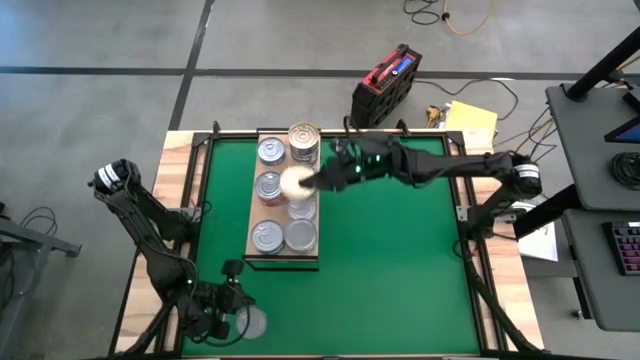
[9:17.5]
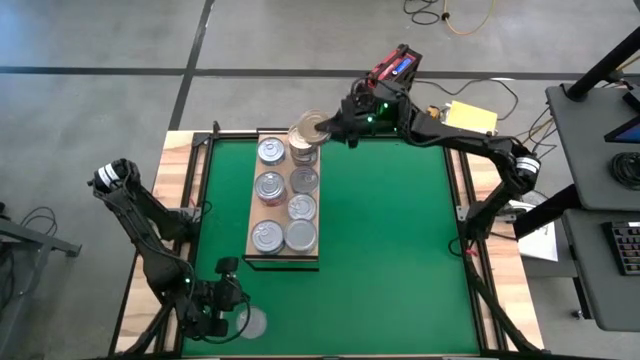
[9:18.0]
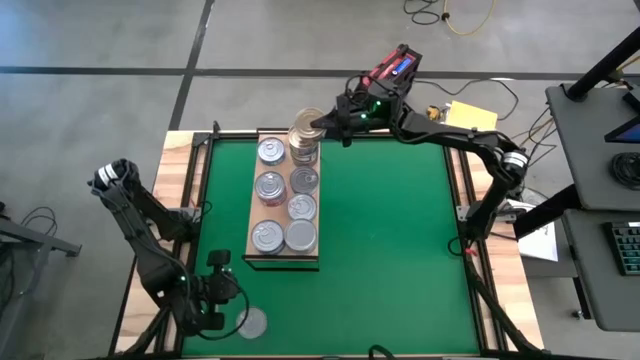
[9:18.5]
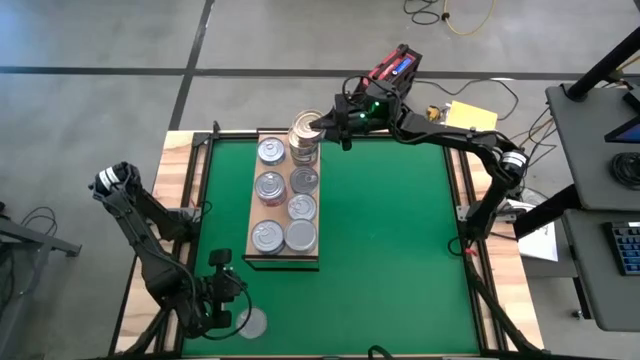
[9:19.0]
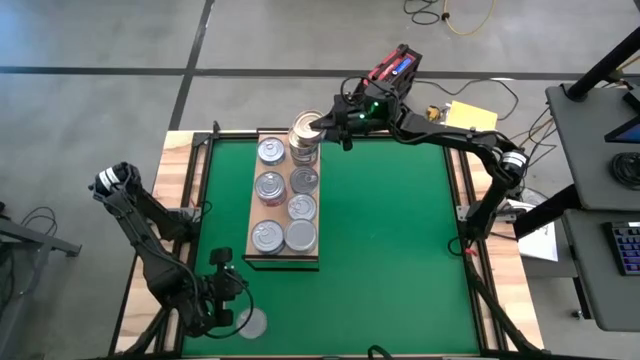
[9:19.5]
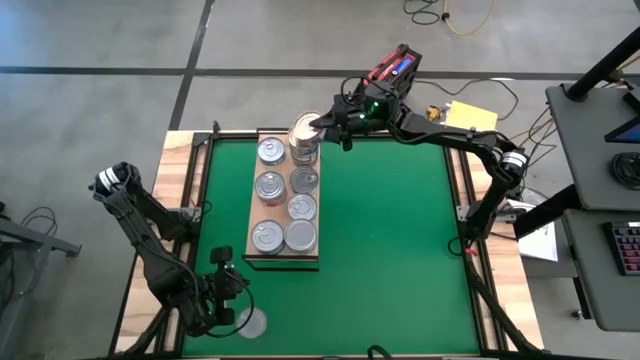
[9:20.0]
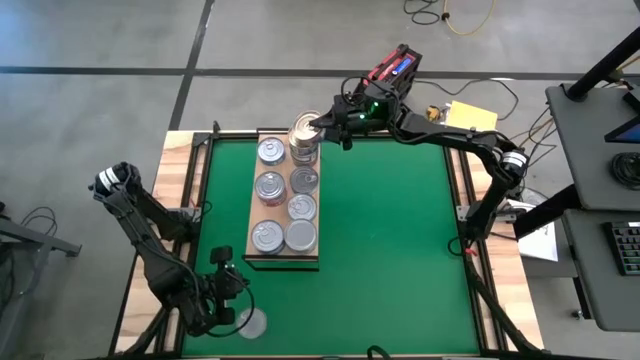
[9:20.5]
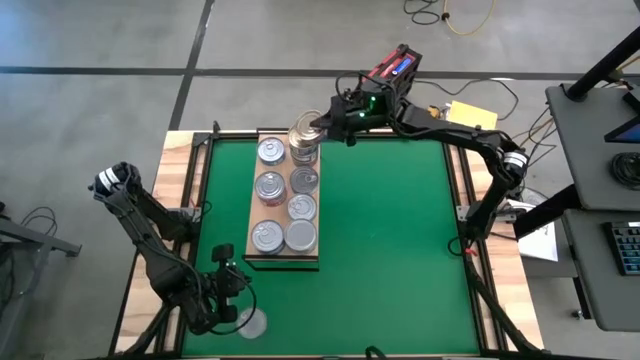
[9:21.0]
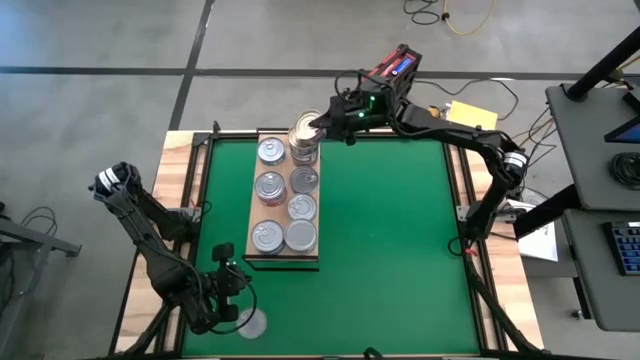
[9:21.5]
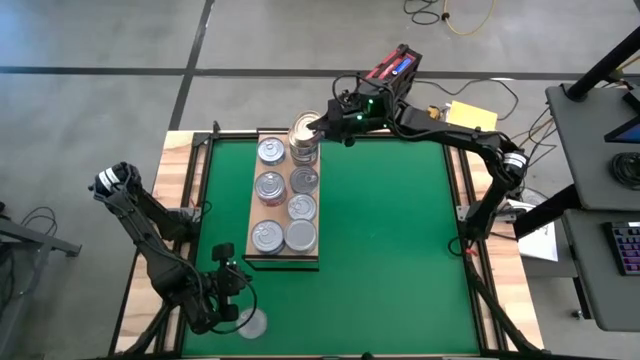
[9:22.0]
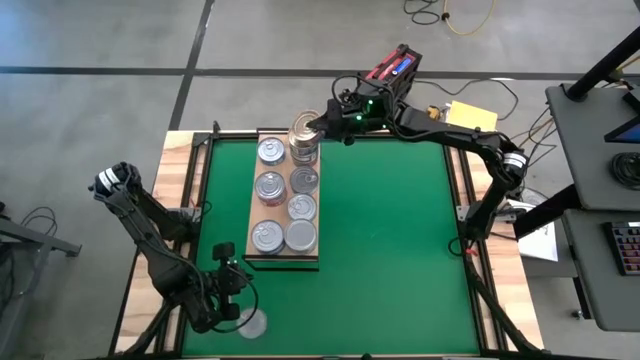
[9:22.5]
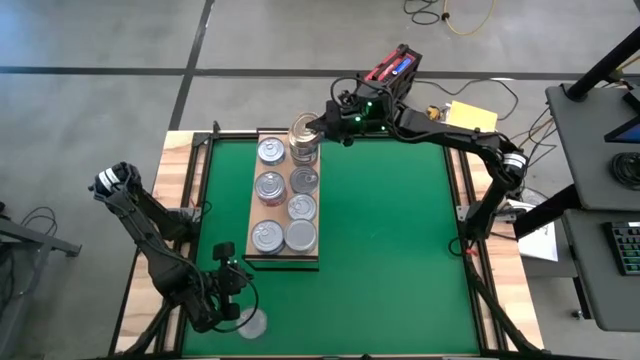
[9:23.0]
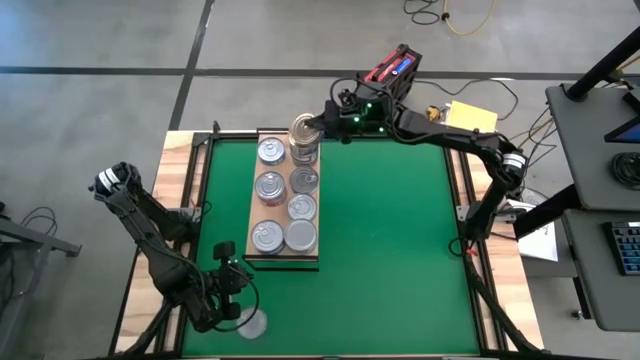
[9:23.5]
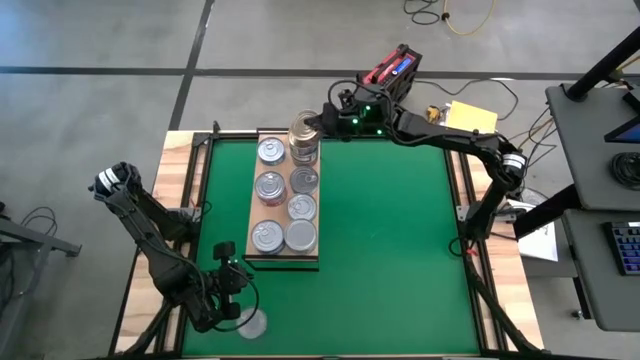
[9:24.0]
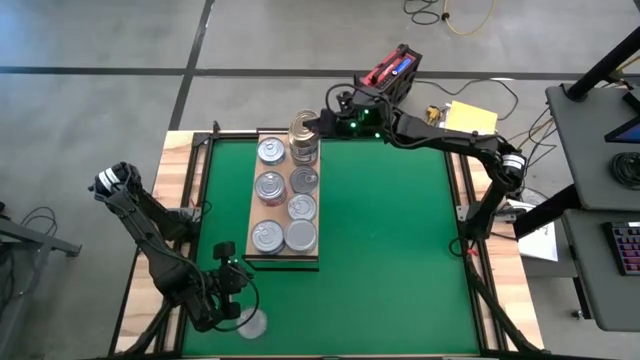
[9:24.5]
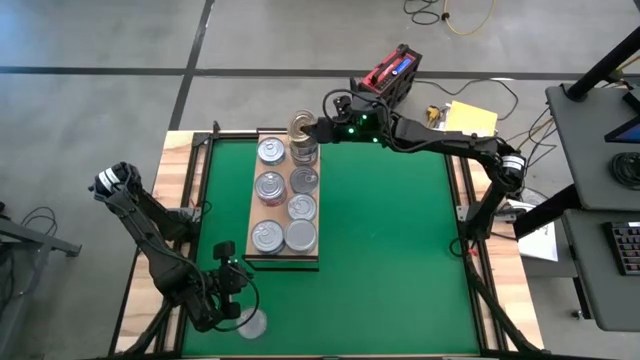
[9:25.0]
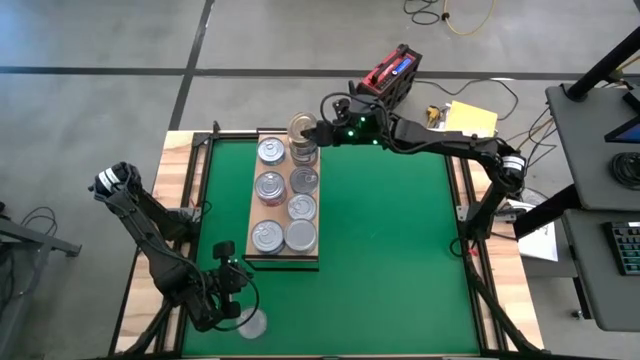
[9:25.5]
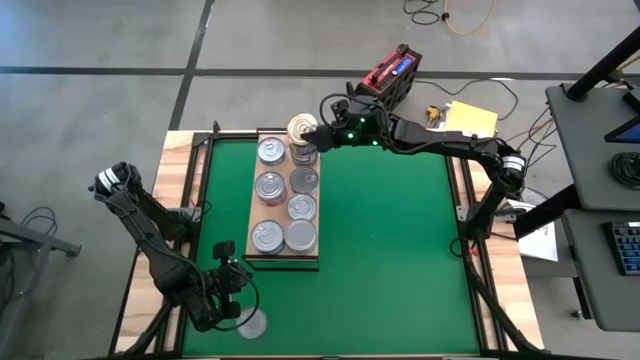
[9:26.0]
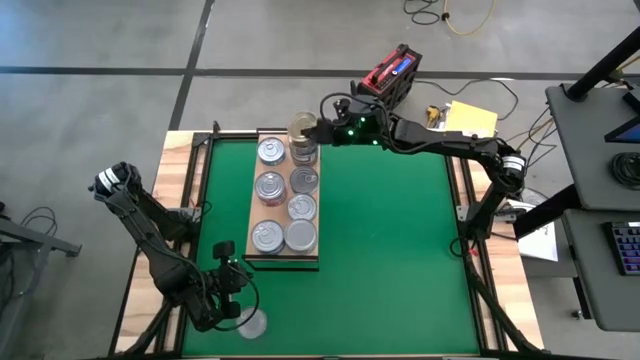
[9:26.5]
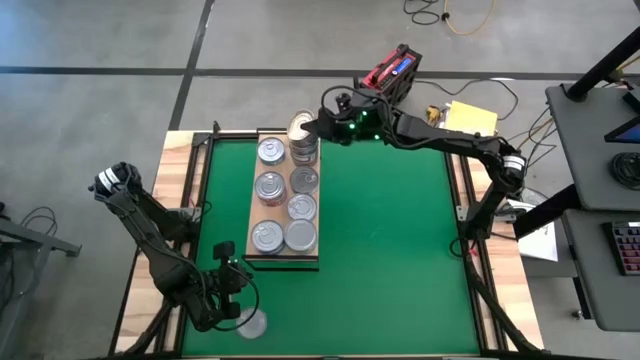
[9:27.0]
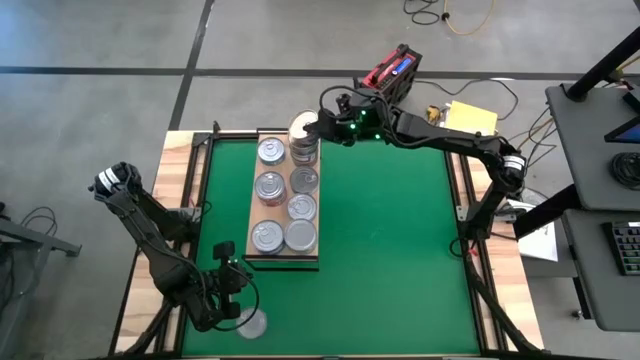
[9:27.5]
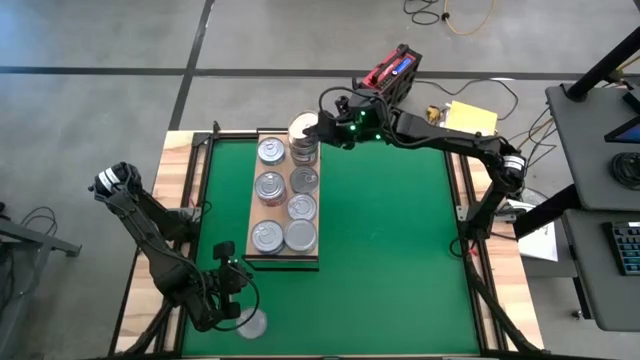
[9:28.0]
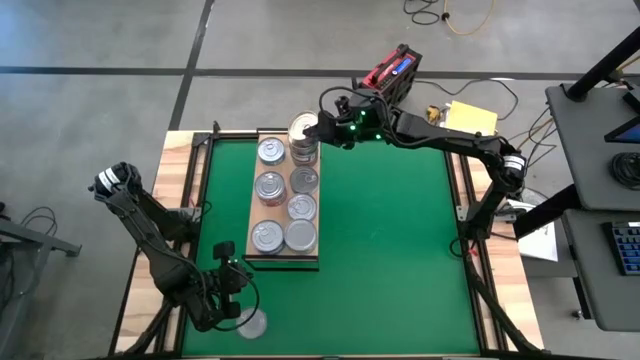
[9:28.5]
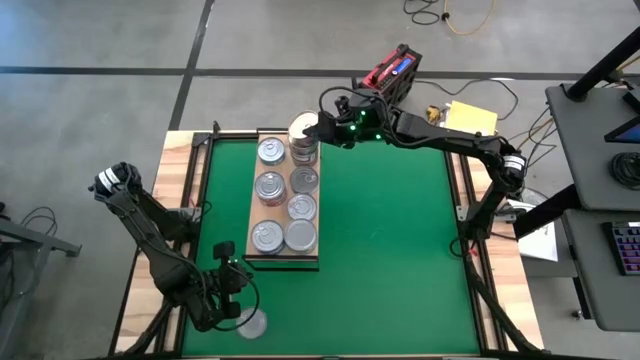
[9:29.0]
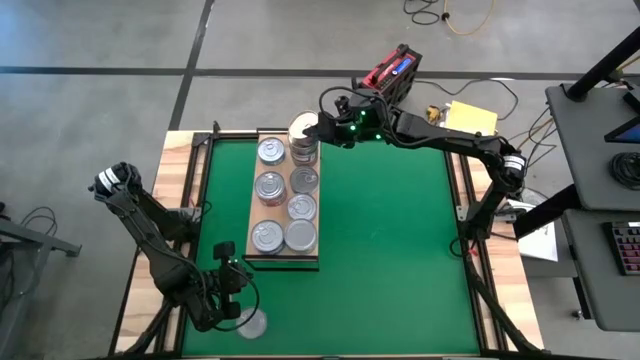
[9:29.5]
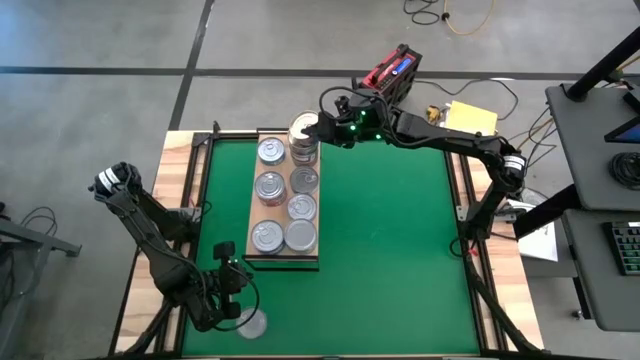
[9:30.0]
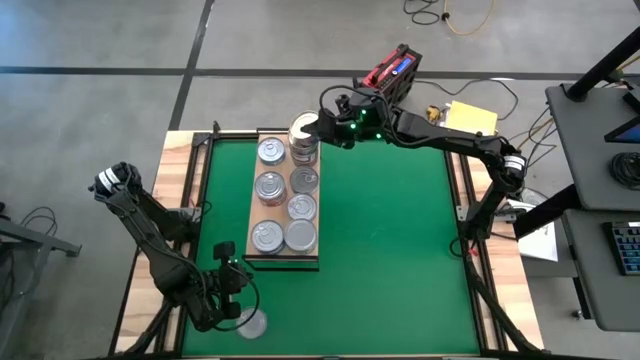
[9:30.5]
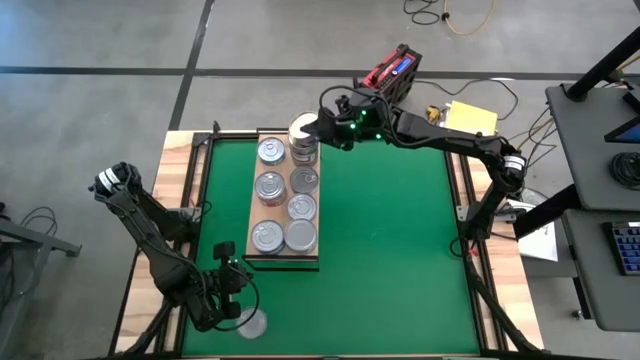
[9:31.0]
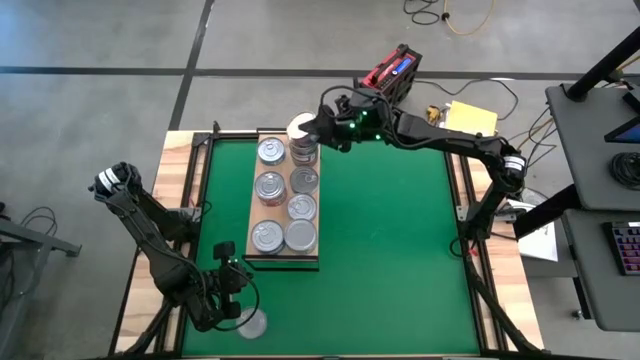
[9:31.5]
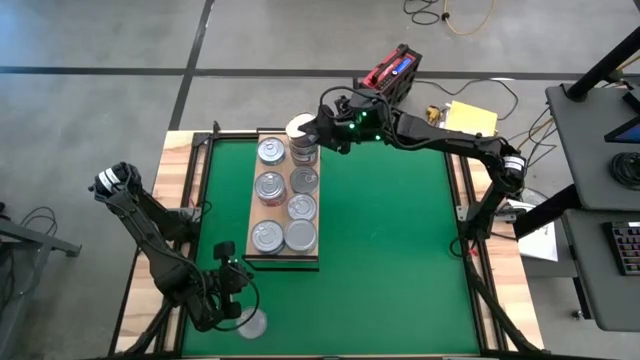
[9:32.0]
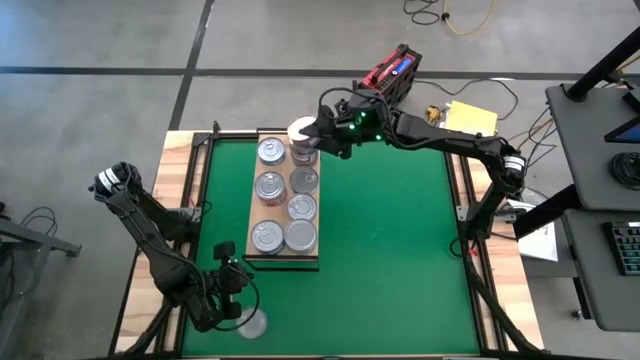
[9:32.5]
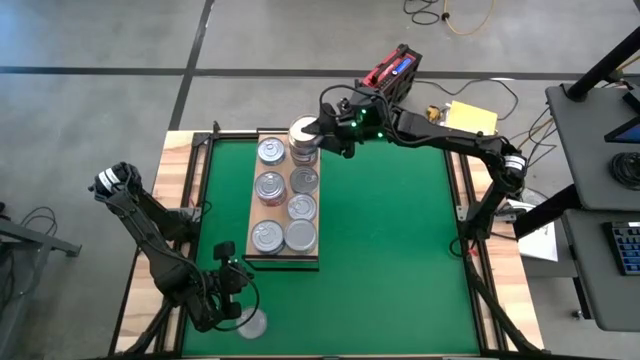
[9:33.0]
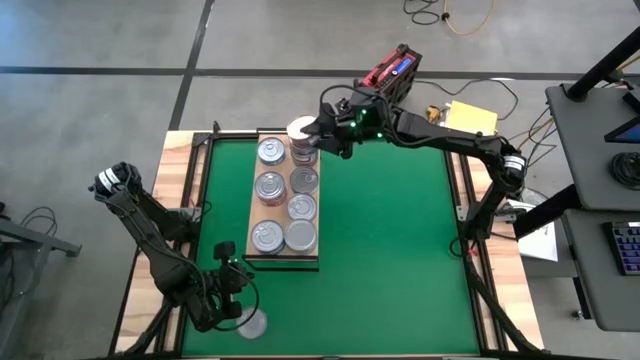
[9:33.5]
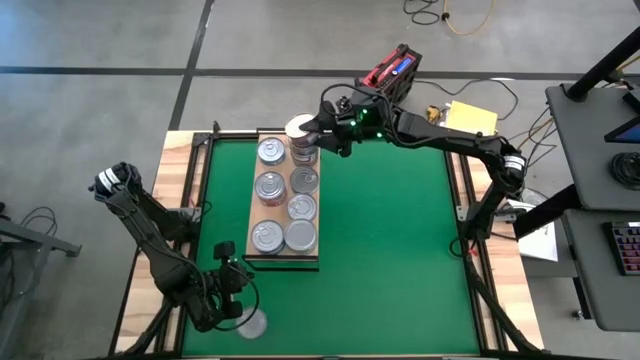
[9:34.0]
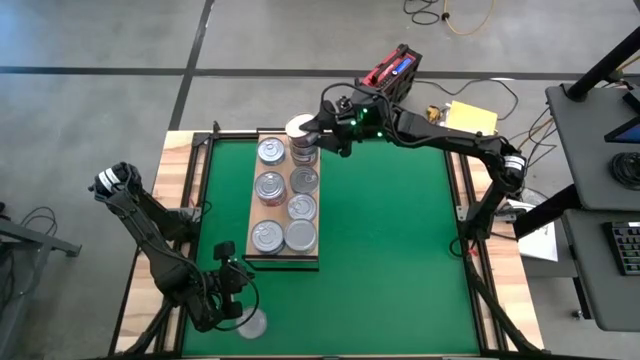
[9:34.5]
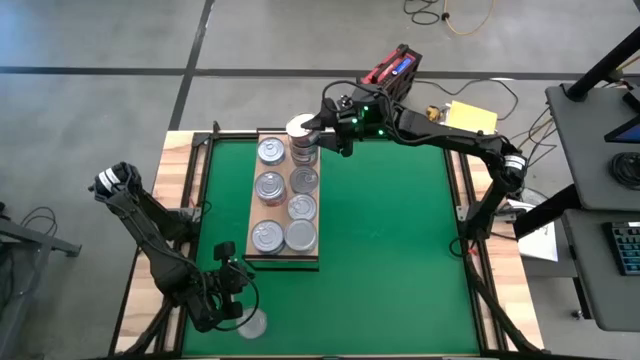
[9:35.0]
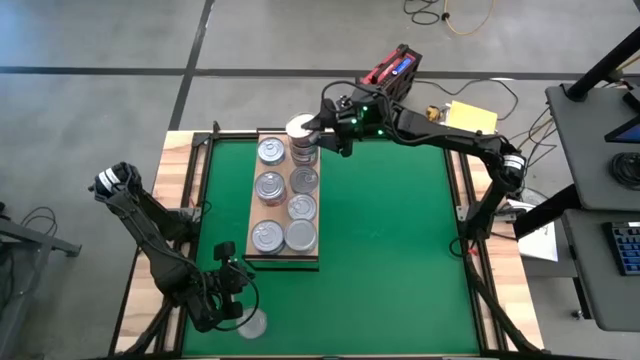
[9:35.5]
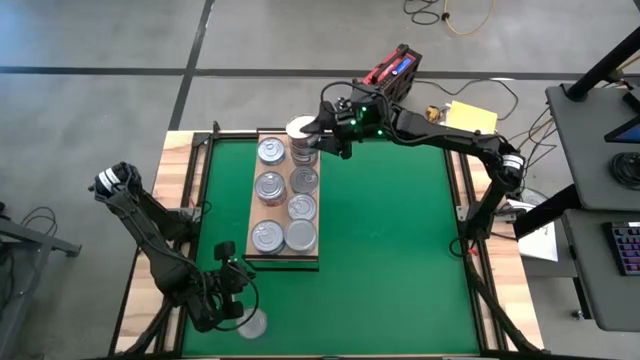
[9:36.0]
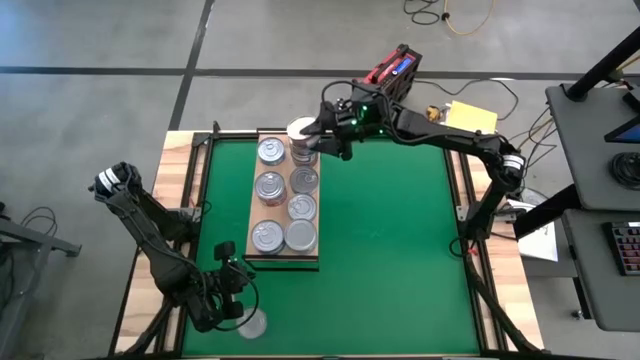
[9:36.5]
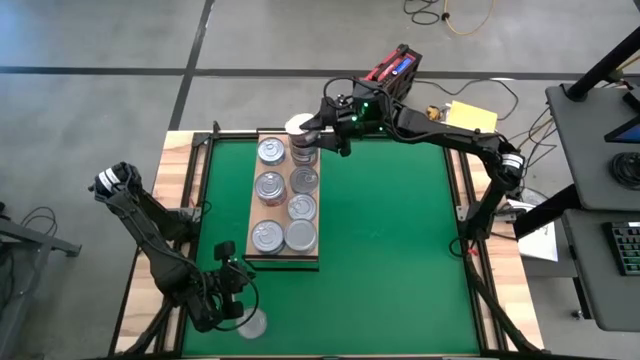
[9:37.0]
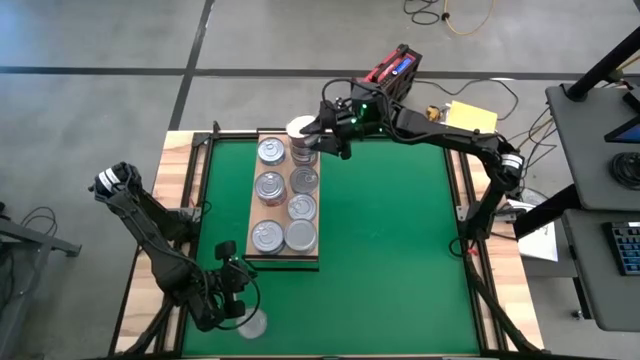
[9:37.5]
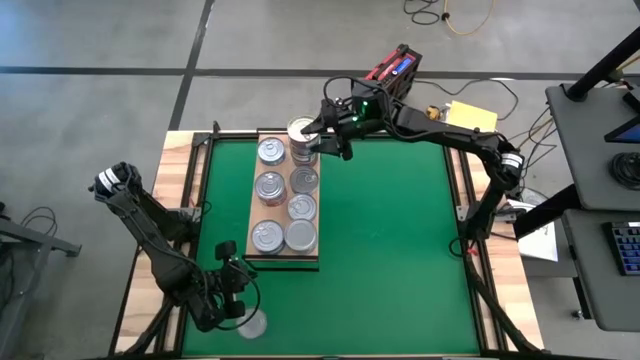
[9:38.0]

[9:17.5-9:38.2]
Task: Stack canned seafood by type on shelf
Stack the blue and pink tuna can on top of the blue and pink tuna cans on the shelf
